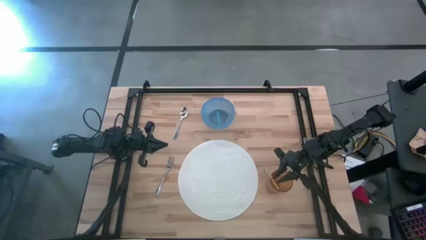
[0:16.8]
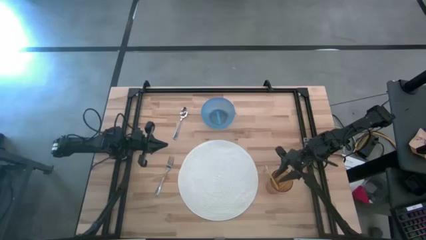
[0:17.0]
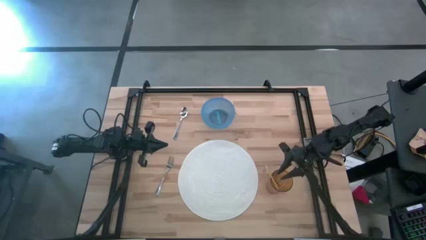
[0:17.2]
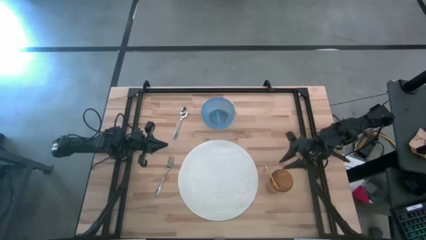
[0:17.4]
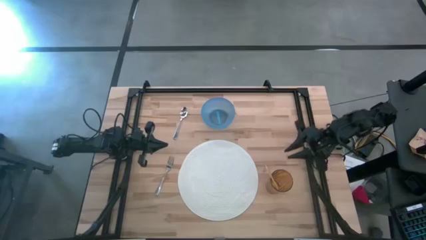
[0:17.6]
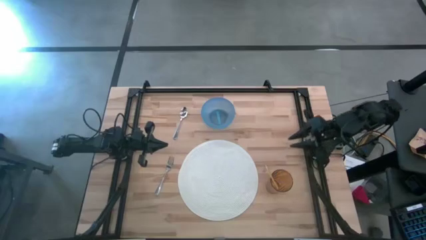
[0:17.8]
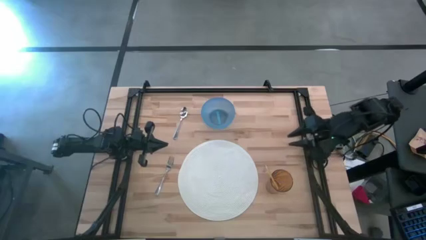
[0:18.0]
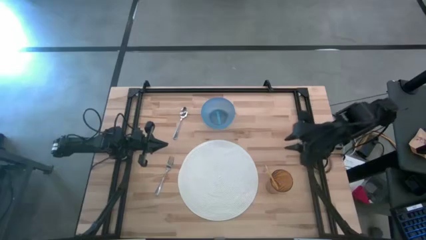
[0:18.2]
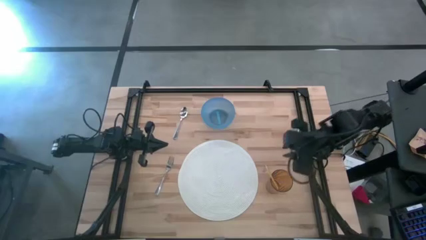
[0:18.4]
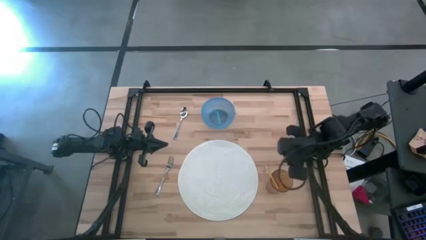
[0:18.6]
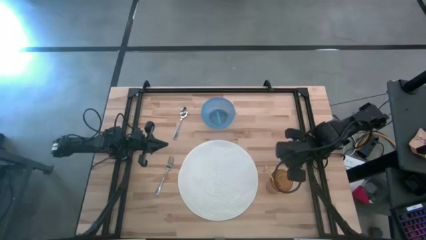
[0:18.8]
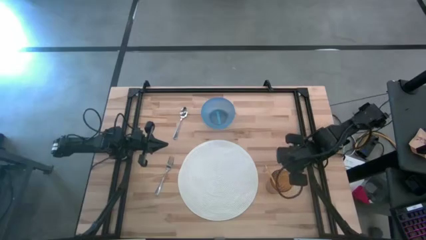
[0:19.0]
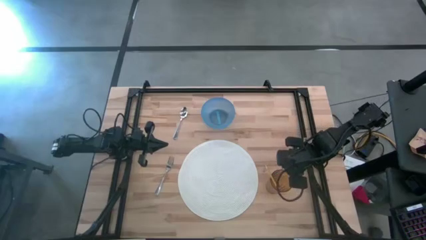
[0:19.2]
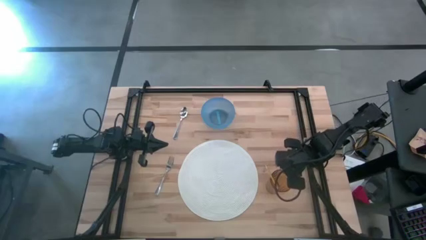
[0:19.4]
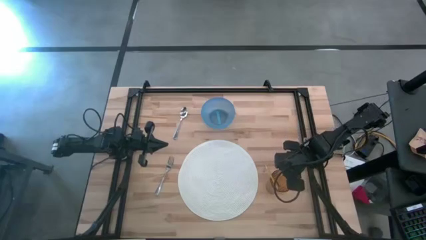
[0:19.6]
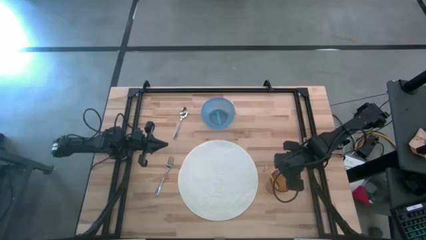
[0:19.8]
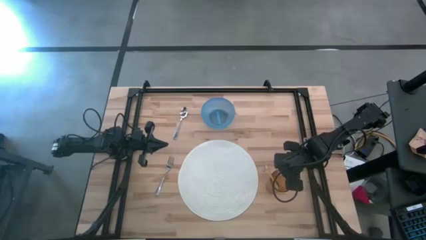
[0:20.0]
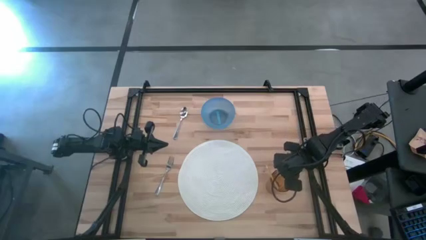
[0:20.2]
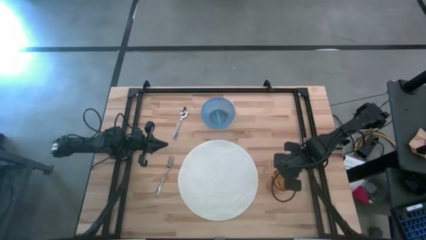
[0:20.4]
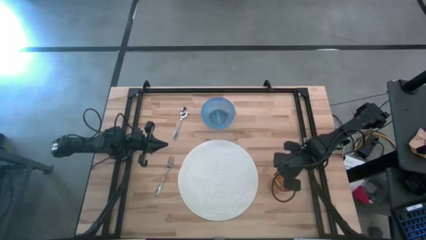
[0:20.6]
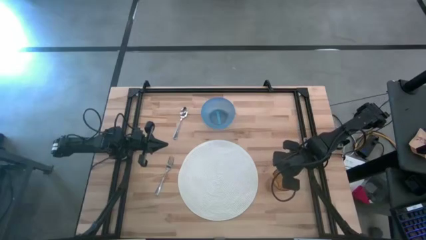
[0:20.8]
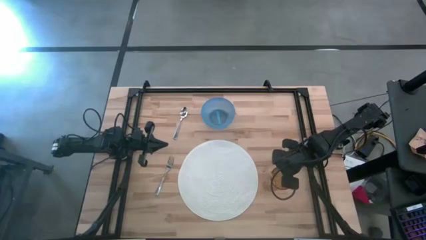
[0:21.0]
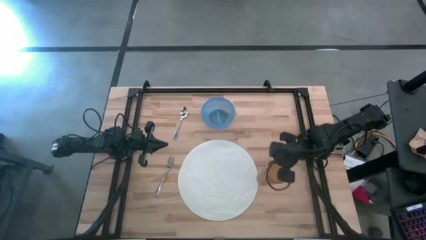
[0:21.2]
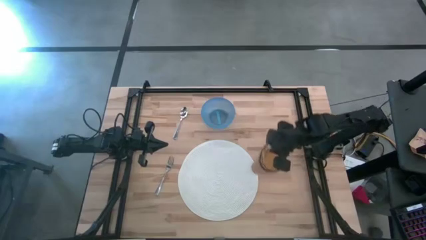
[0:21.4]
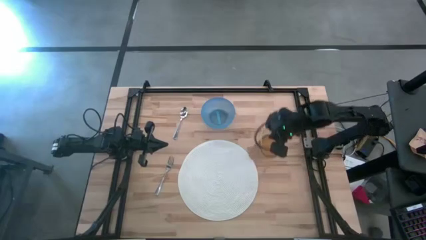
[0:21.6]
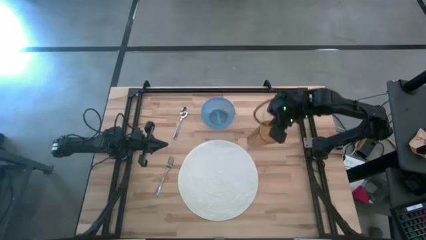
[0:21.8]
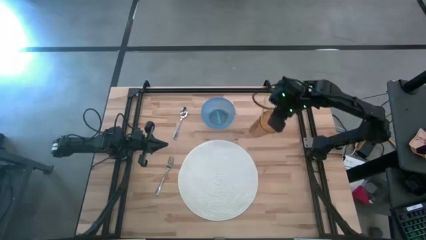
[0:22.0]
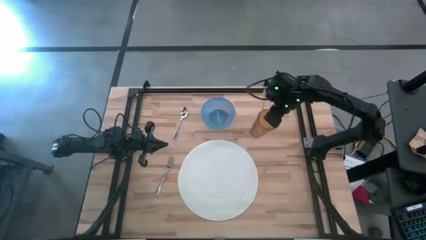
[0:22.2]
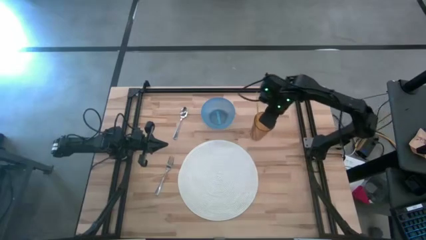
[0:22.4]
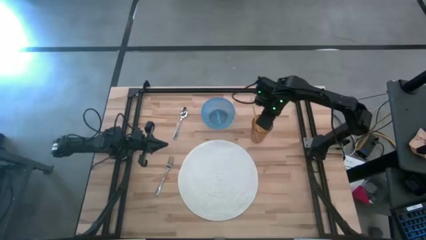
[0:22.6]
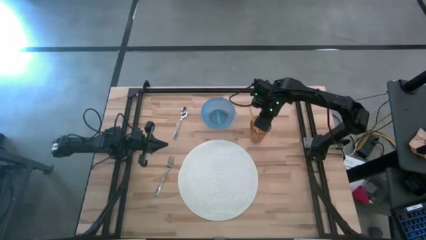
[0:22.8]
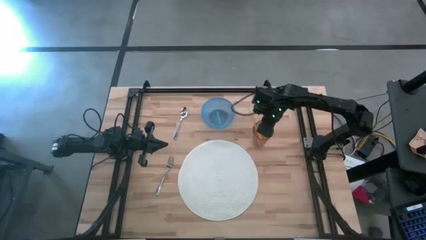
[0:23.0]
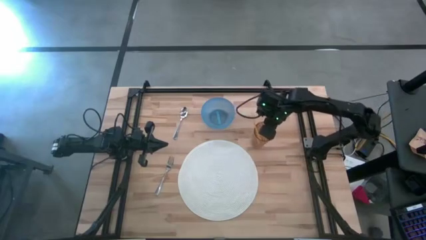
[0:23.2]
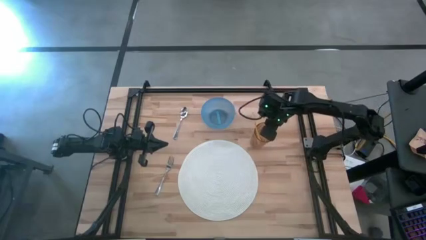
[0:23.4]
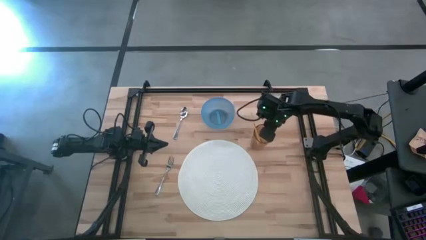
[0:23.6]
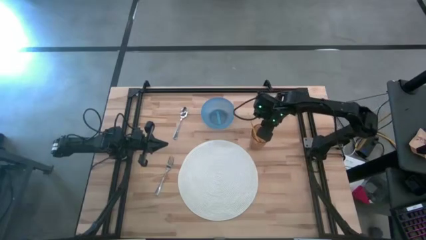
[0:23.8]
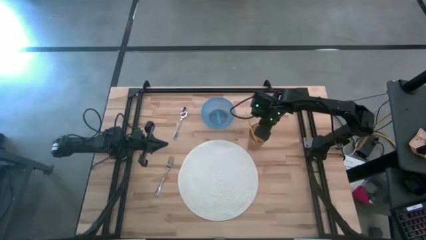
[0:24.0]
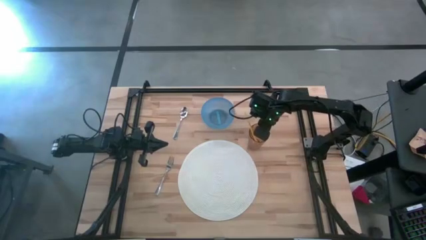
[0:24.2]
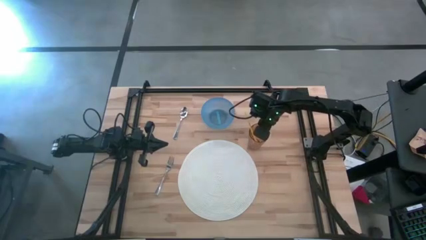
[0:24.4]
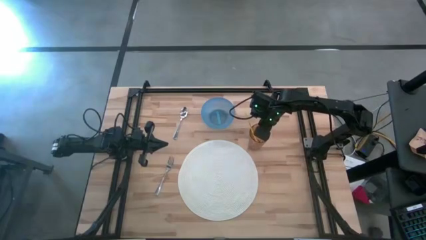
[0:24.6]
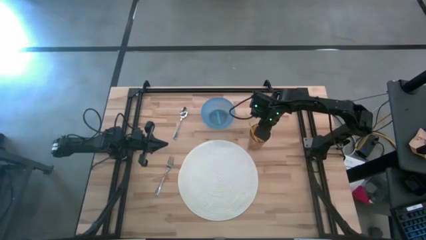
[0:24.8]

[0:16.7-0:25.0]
Task: Pick & Place Utensil
Move the brown cup to the top right of the white mat

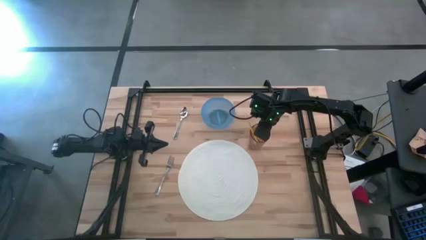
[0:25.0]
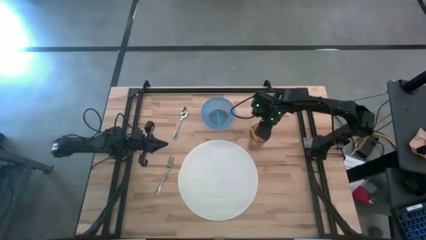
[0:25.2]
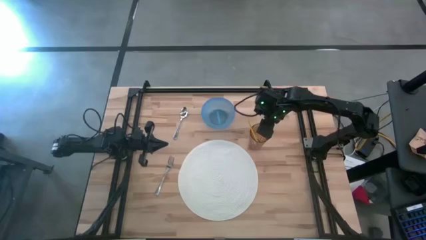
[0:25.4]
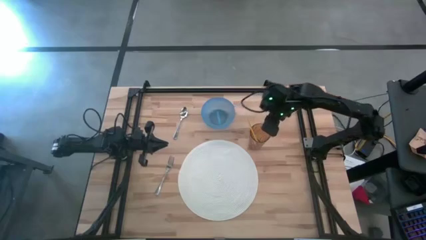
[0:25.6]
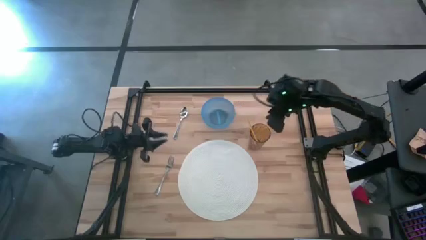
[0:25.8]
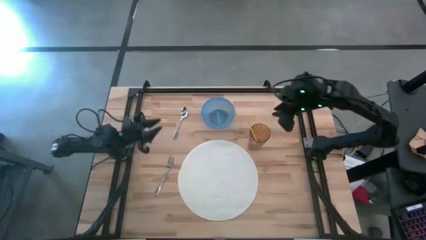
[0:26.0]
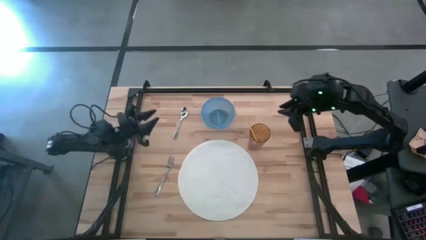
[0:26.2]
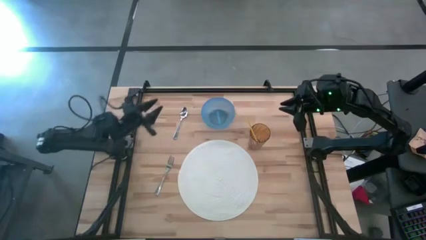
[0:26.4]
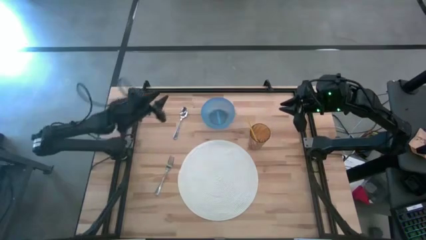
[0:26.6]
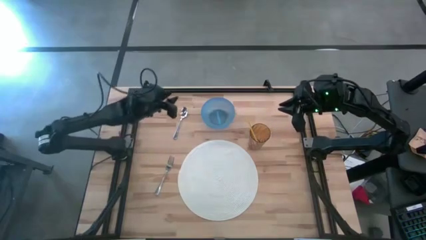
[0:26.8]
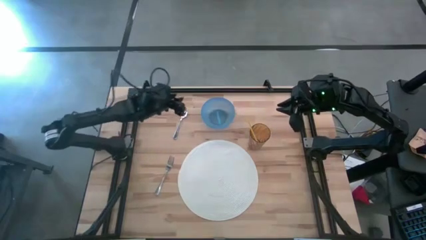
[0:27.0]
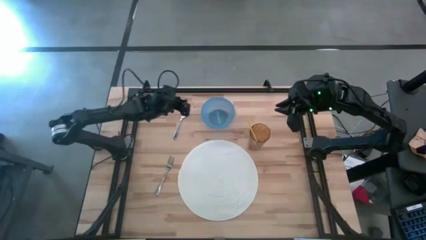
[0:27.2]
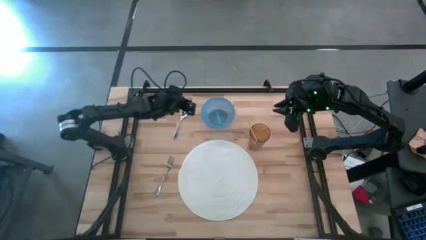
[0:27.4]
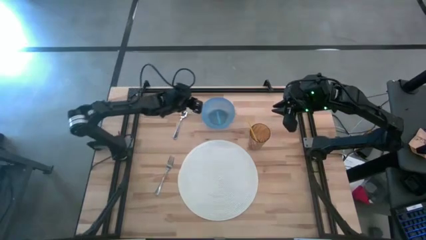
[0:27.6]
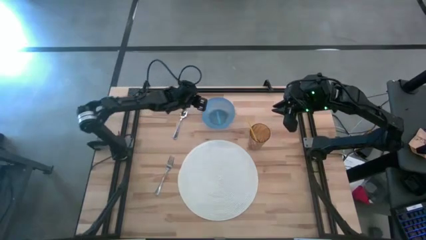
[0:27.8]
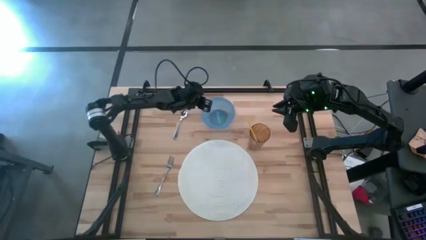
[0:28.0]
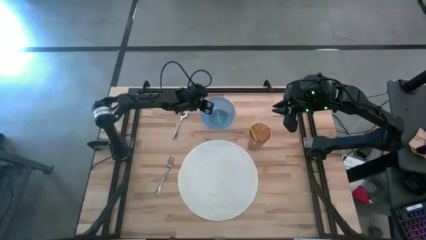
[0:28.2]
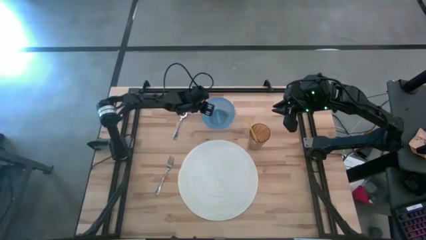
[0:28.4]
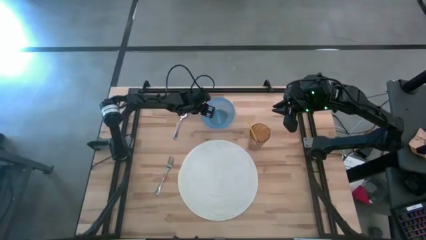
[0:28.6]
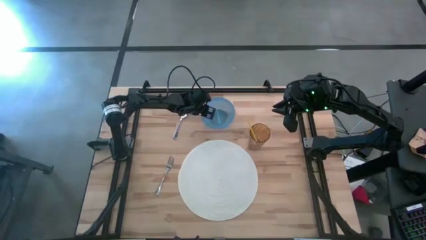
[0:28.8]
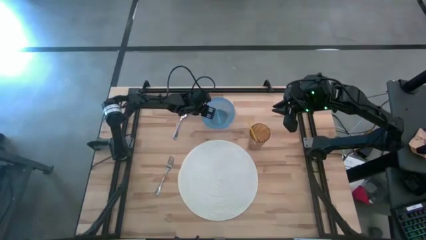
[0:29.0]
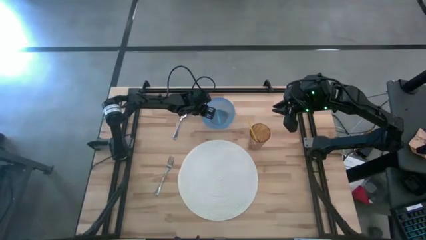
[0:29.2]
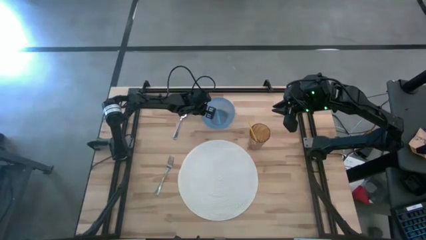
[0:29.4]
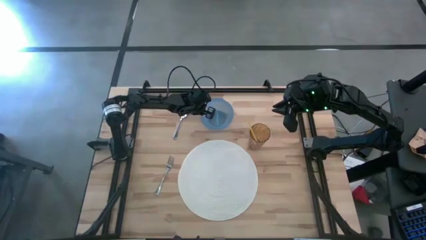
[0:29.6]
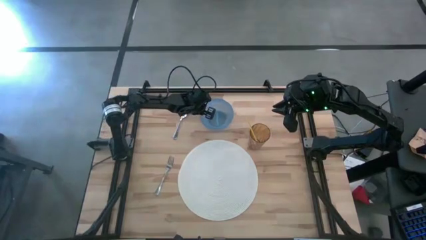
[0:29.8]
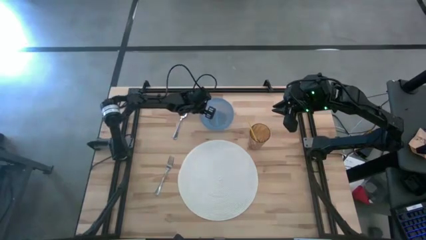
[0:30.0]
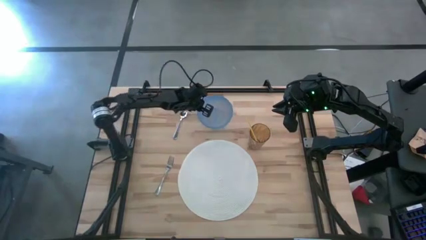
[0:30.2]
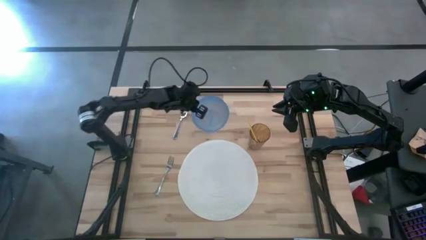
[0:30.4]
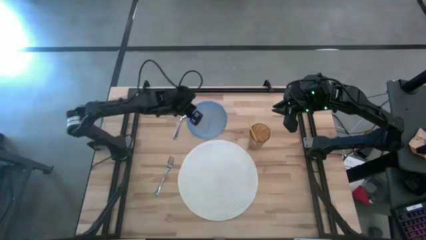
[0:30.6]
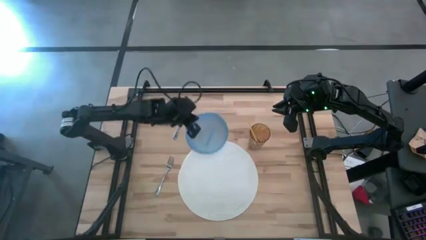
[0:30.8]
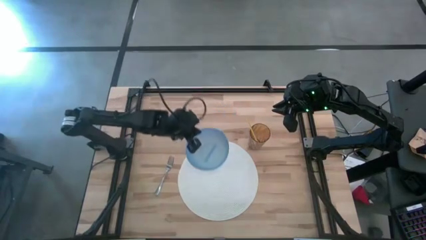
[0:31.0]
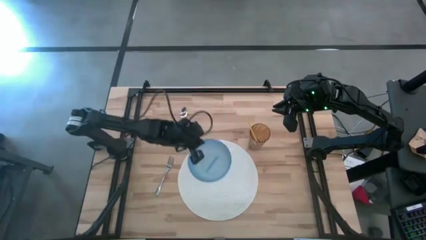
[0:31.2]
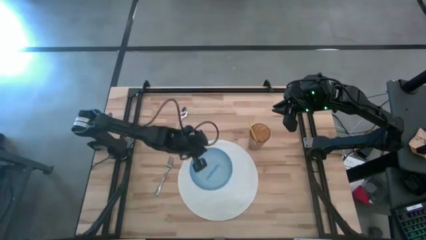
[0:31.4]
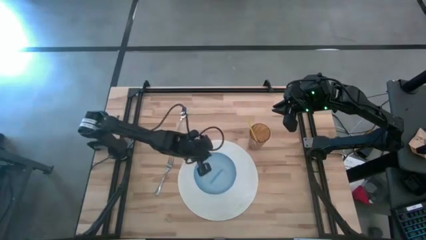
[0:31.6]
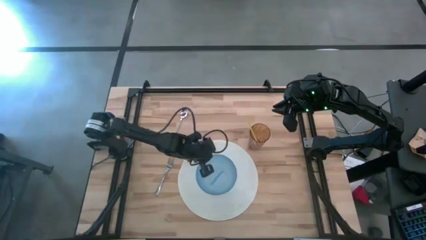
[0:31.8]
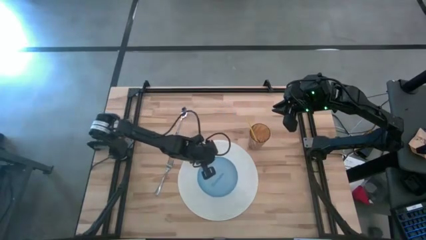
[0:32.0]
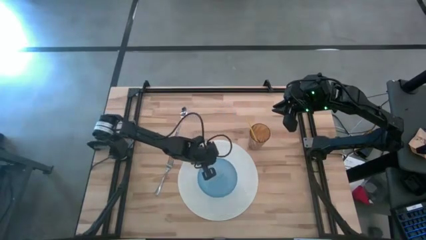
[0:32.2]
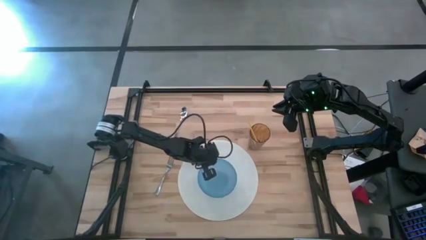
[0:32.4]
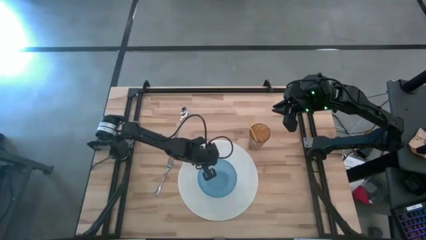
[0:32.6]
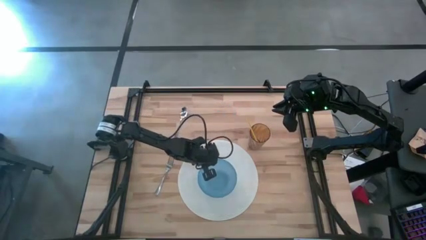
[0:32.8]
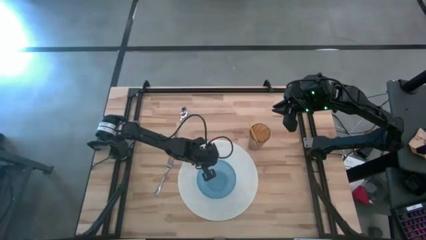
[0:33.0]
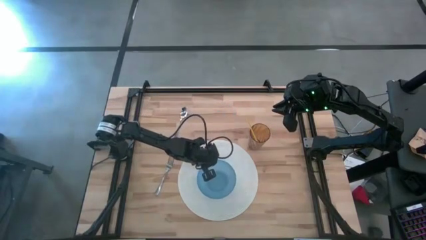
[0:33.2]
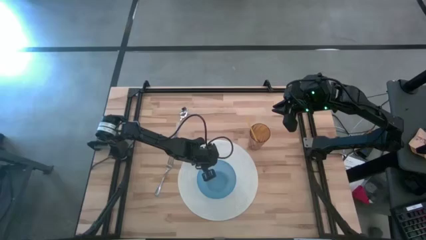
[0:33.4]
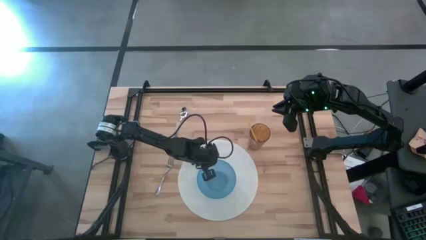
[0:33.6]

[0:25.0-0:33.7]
Put the blue bowl on the white mat
